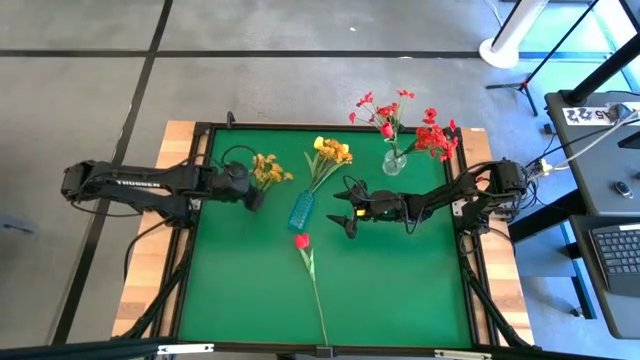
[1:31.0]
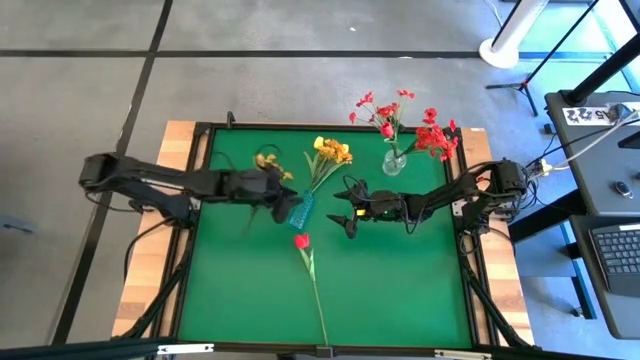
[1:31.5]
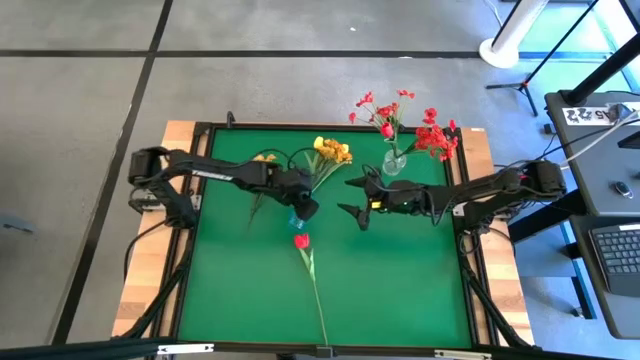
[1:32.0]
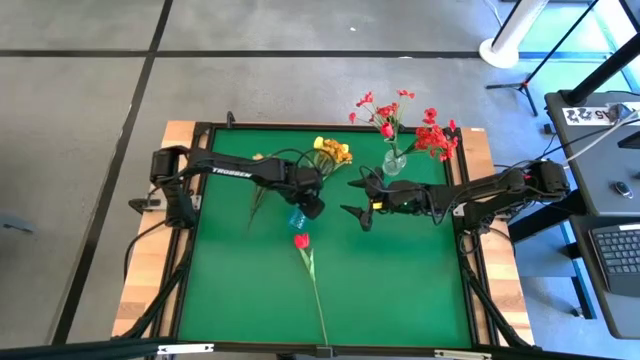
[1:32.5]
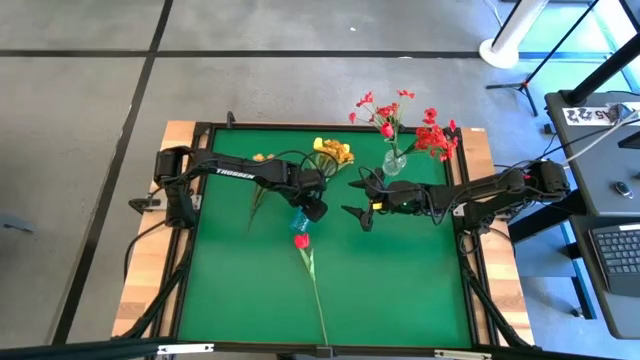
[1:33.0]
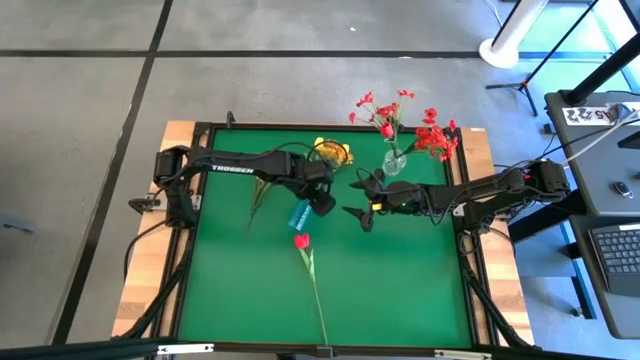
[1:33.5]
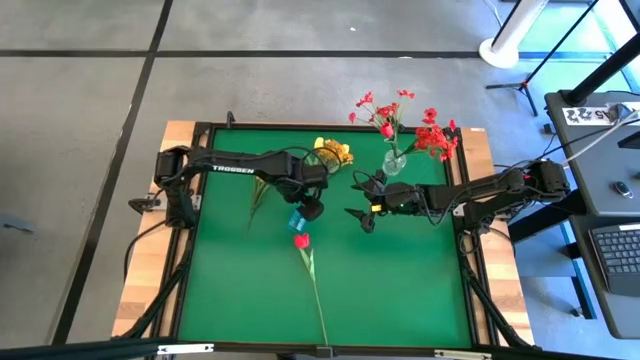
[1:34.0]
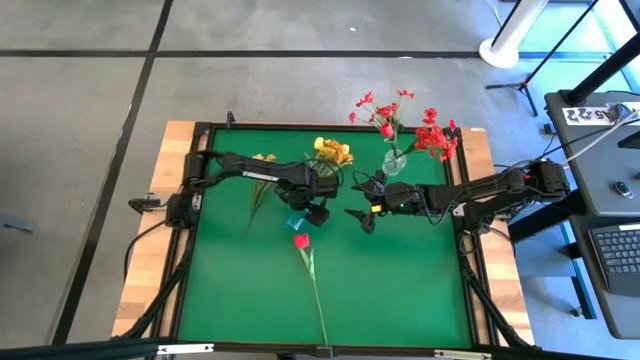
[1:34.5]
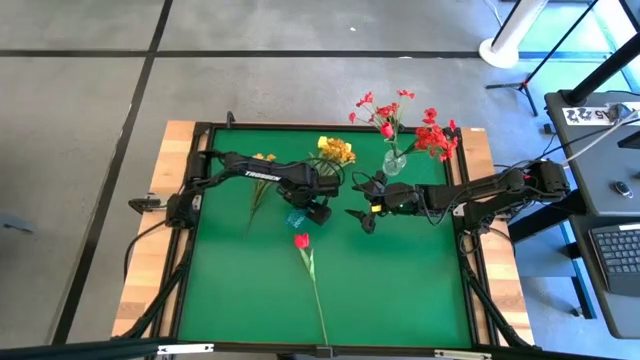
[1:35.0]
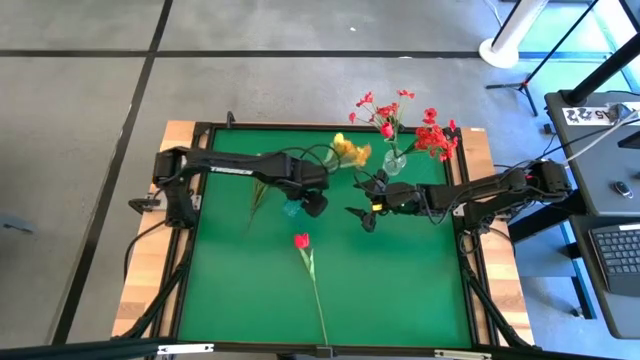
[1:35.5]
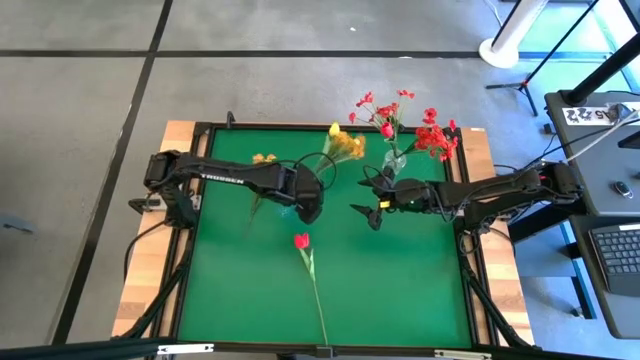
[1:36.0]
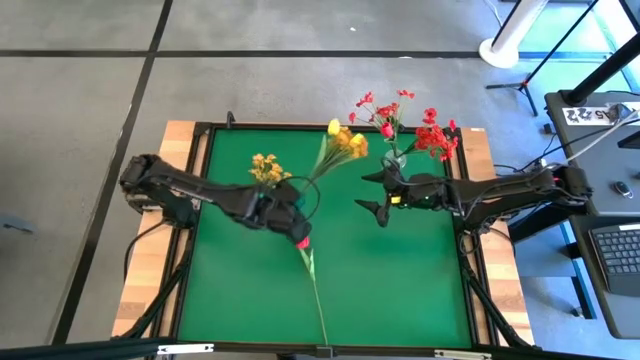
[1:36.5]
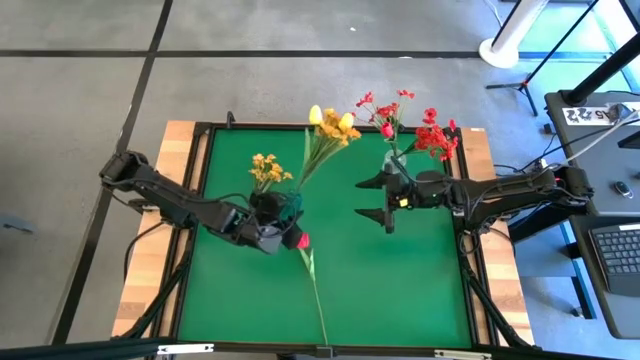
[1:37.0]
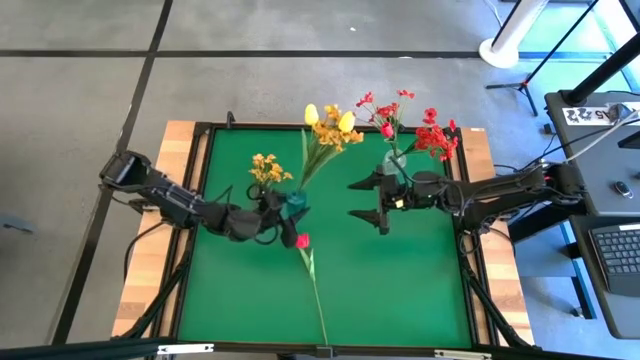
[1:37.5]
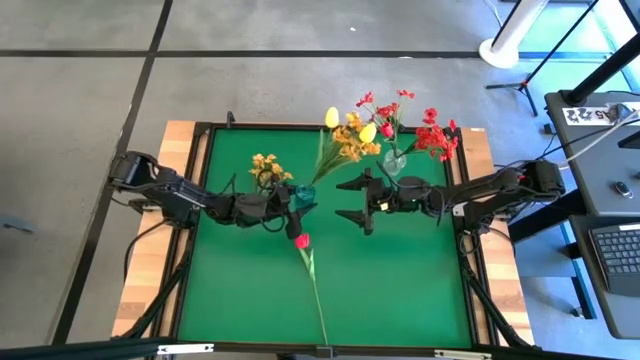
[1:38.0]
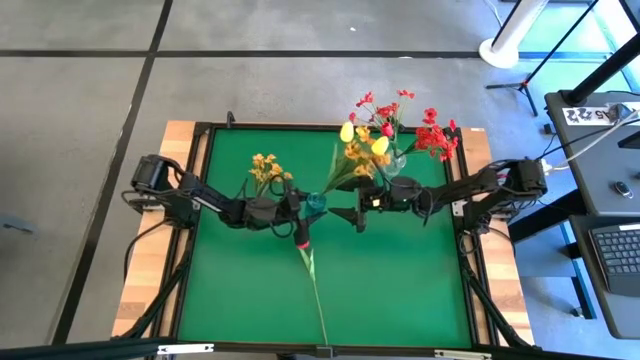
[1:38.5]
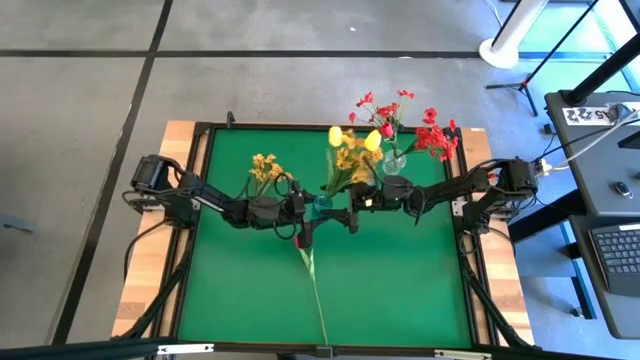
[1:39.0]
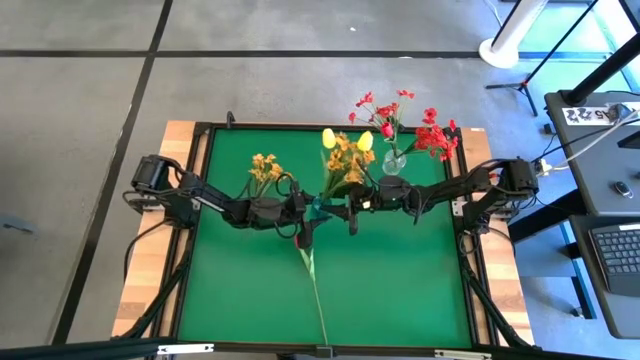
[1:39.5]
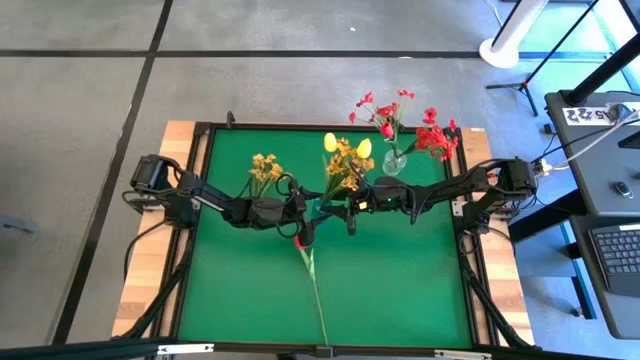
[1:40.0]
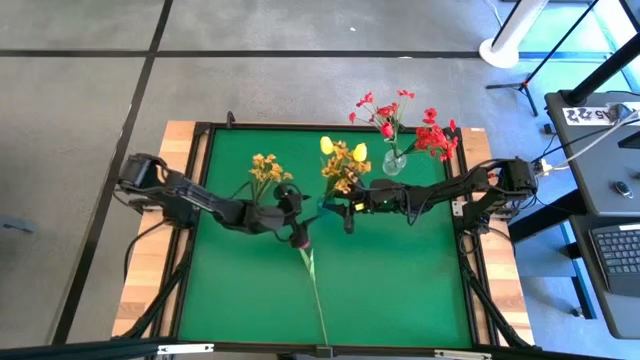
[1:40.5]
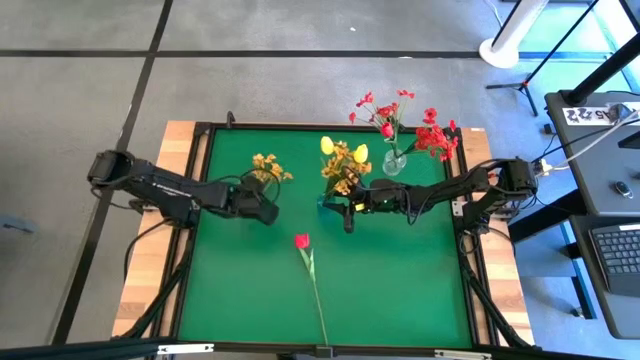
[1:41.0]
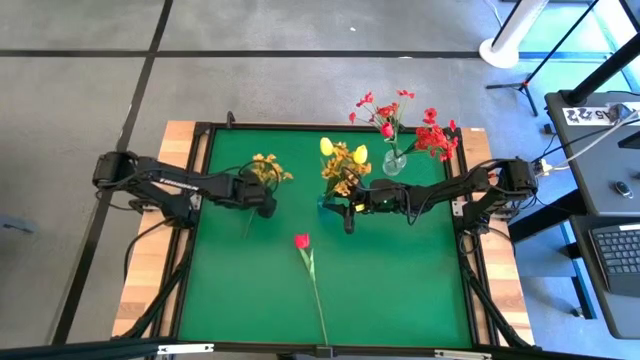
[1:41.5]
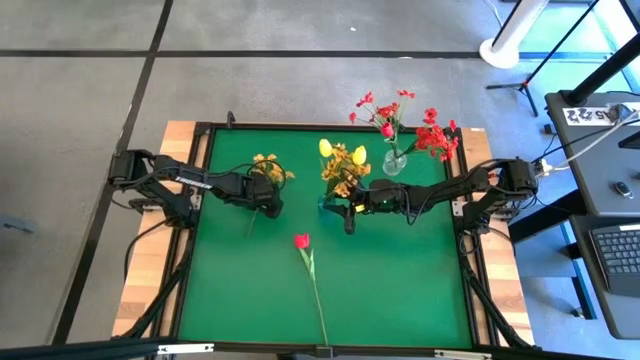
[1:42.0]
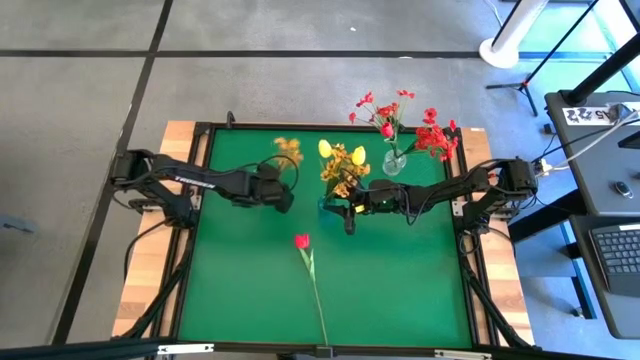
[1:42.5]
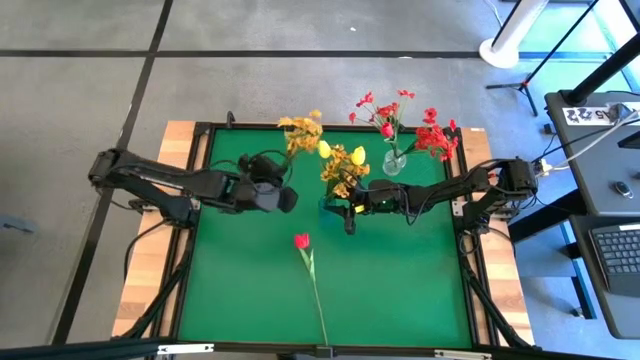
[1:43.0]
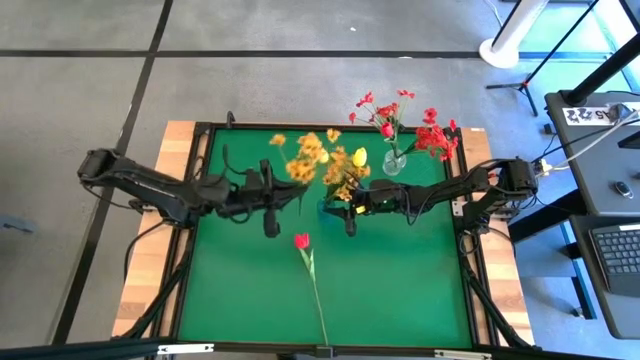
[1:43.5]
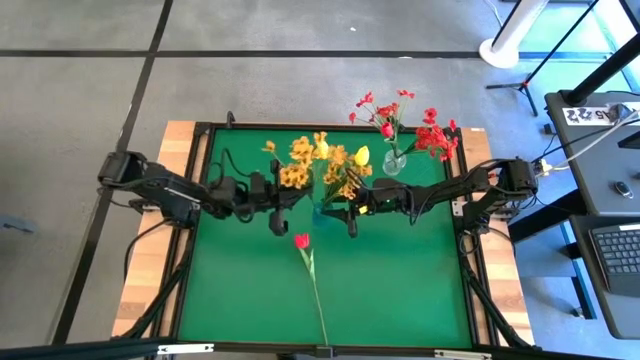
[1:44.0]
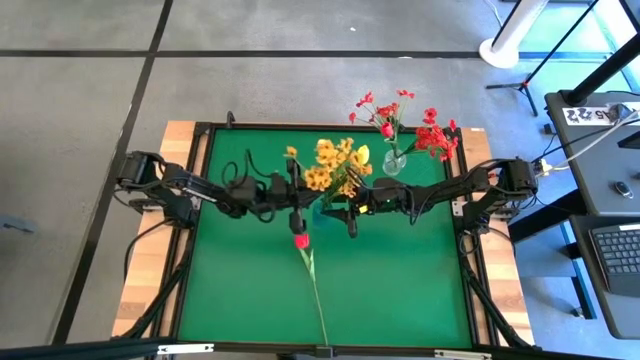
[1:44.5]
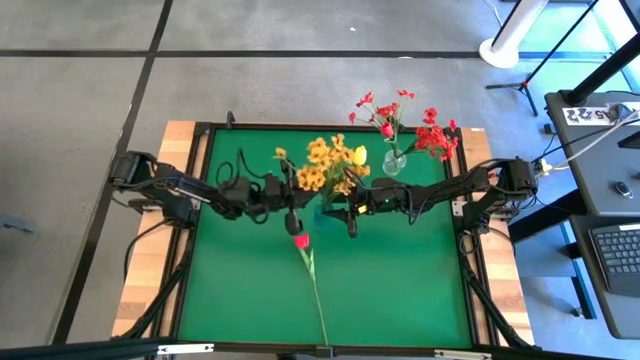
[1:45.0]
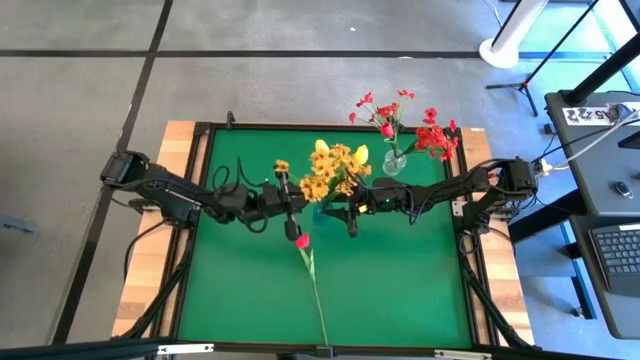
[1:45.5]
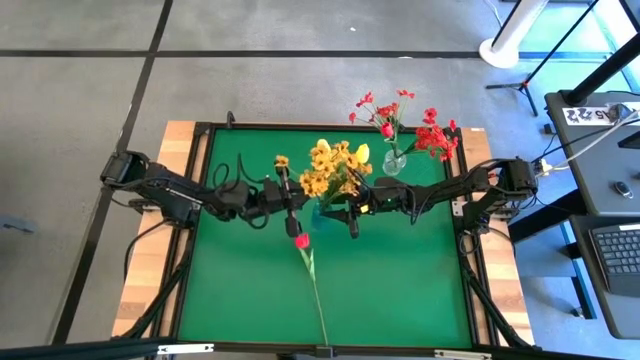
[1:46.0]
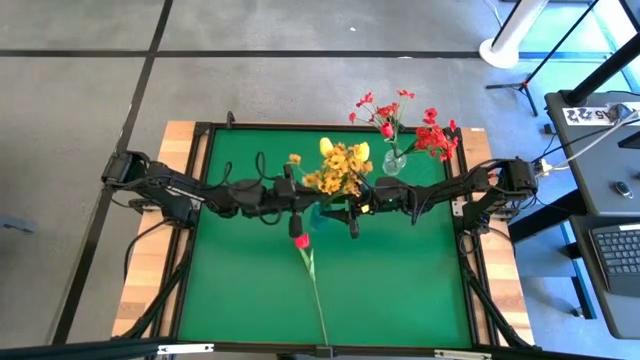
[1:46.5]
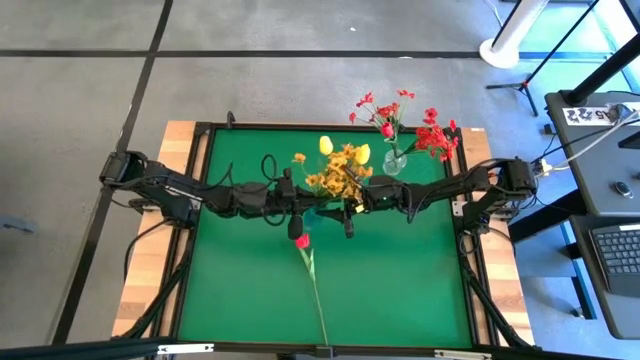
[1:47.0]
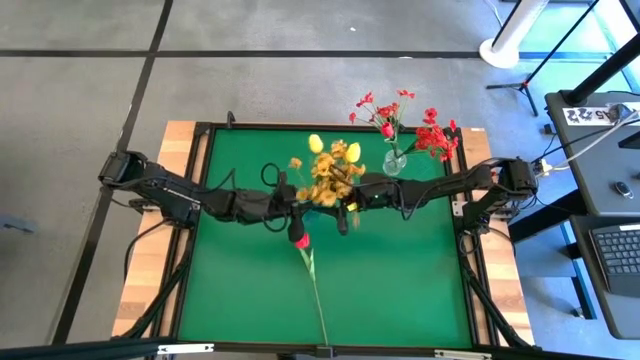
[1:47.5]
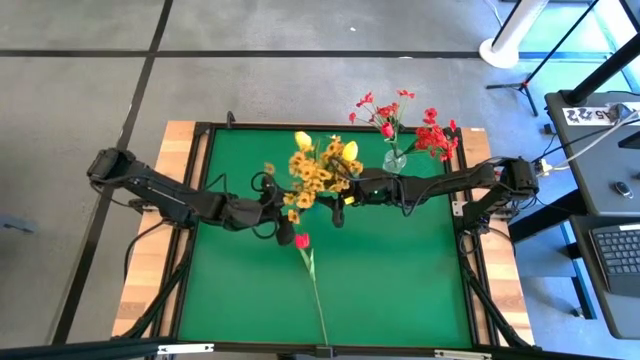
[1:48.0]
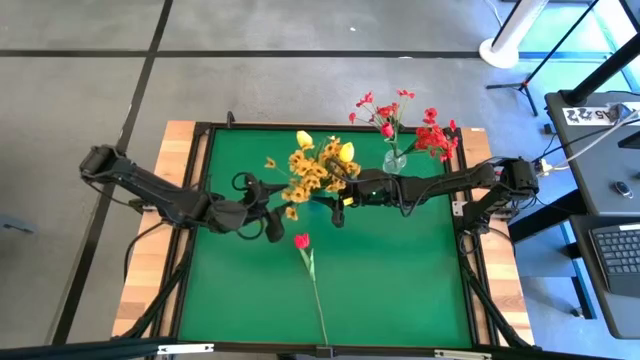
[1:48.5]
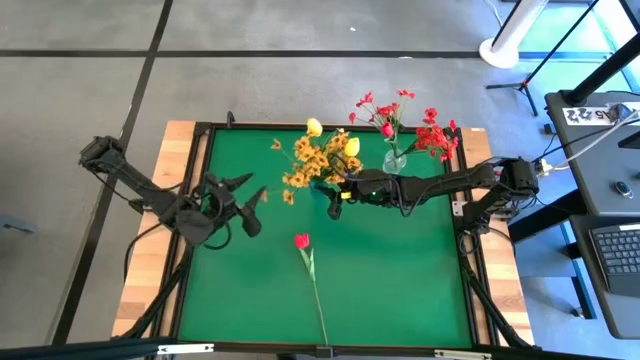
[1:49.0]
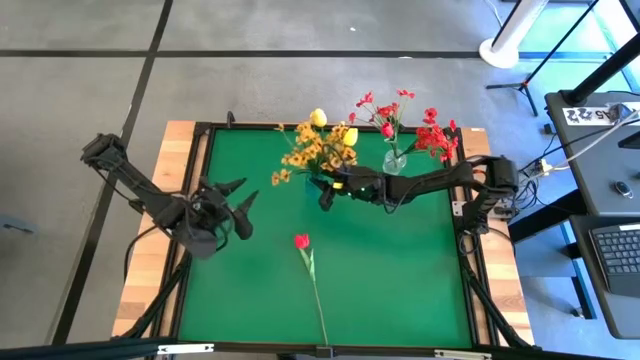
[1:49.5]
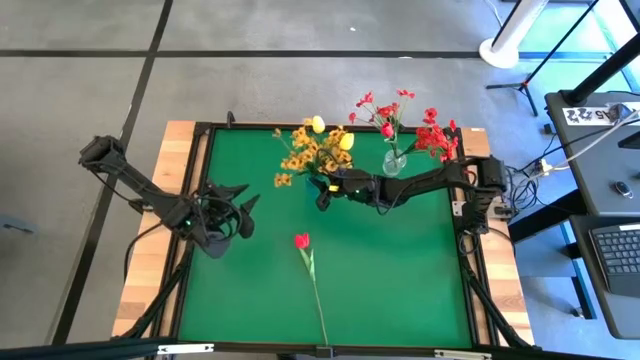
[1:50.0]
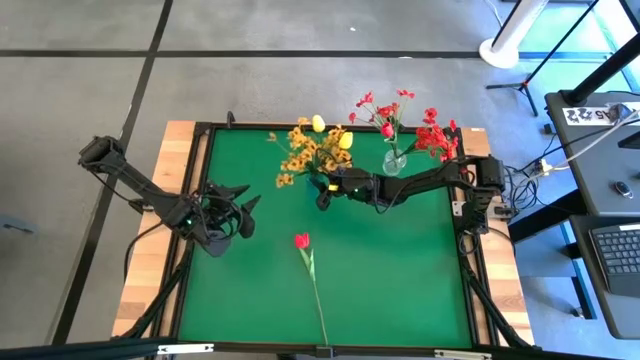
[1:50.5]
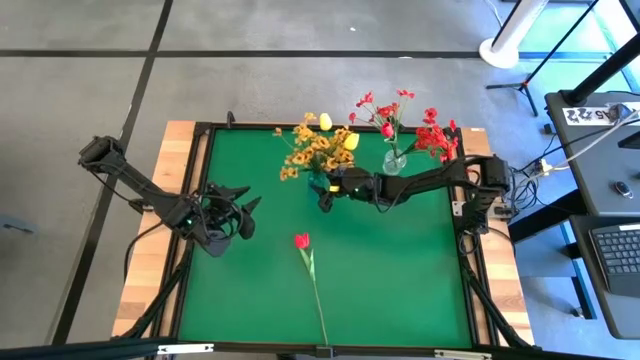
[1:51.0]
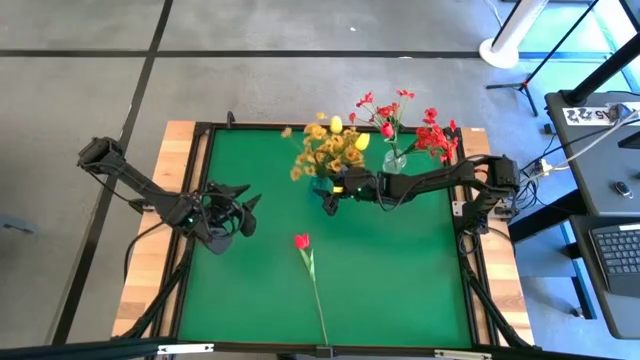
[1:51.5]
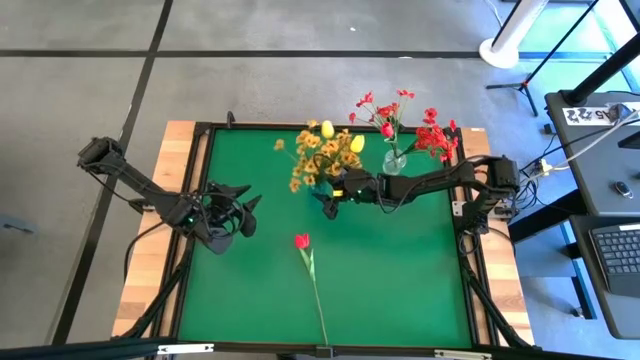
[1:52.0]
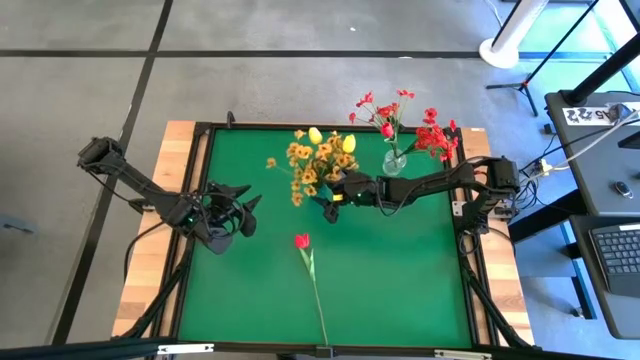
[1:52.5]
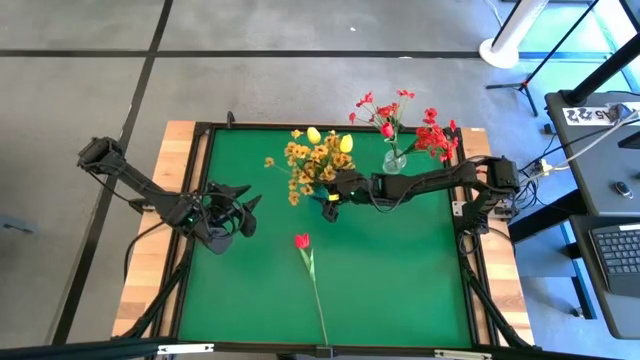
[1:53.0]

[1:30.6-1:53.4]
Task: Sort flowers into vase by color
Put the yellow flower into the blue vase
